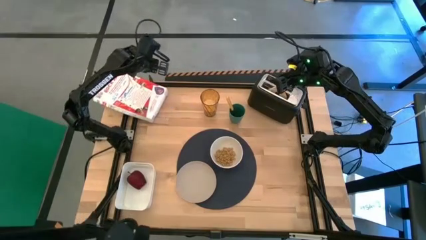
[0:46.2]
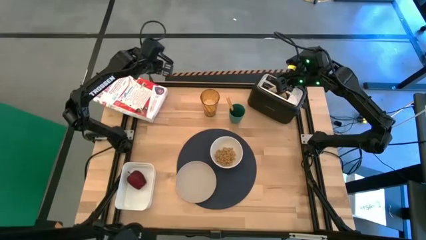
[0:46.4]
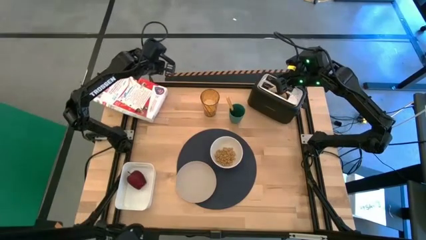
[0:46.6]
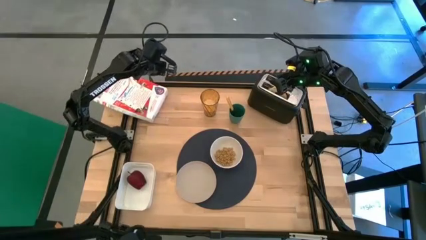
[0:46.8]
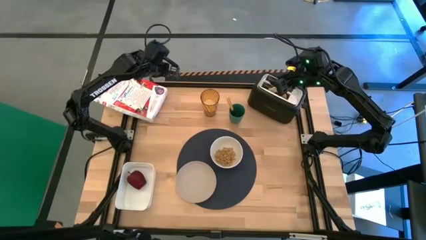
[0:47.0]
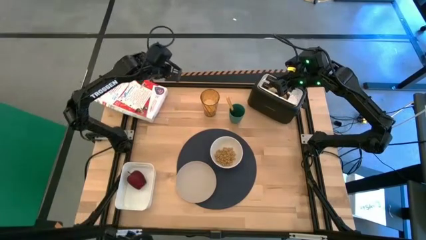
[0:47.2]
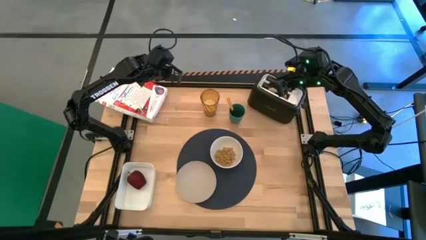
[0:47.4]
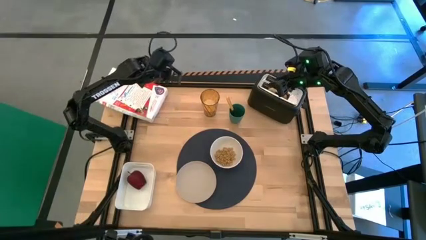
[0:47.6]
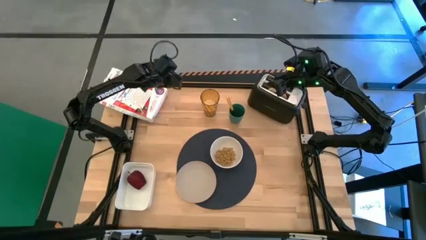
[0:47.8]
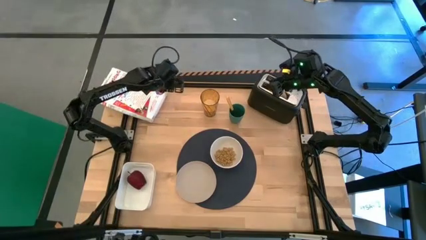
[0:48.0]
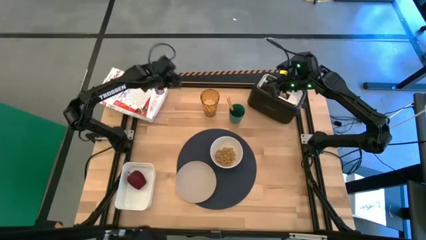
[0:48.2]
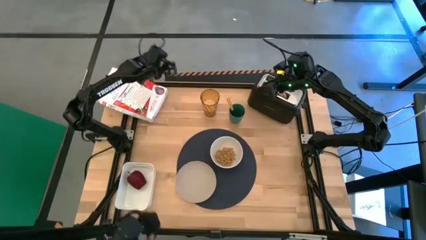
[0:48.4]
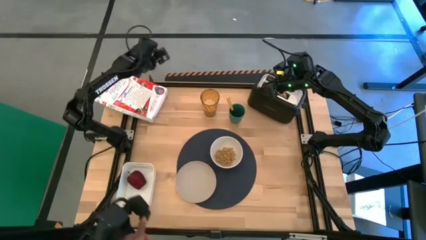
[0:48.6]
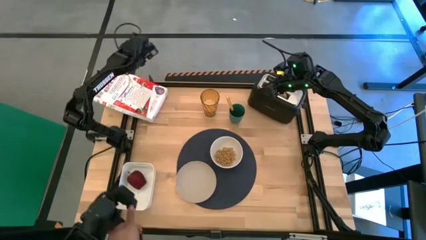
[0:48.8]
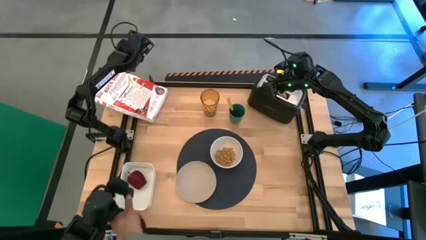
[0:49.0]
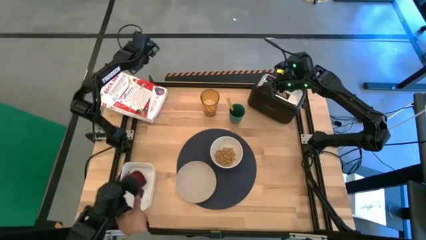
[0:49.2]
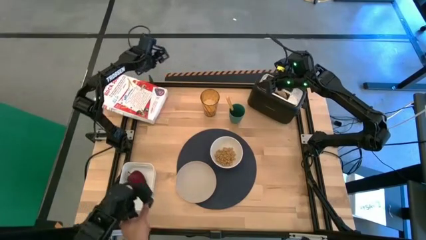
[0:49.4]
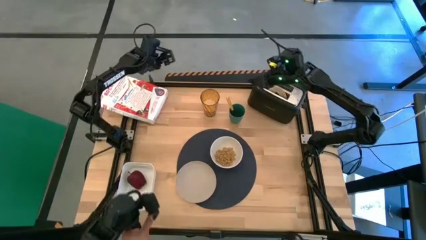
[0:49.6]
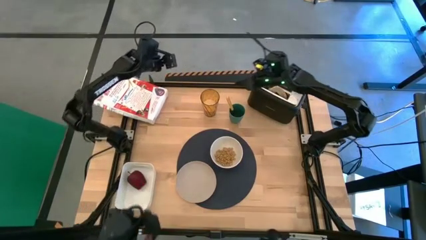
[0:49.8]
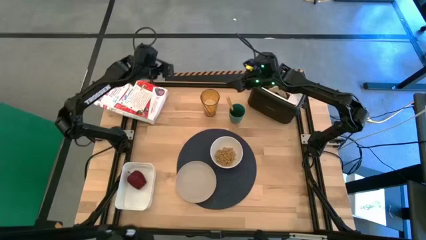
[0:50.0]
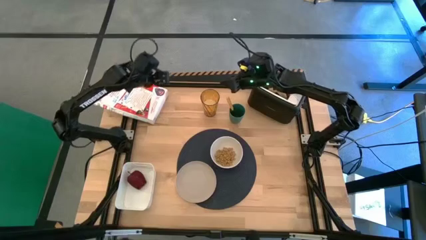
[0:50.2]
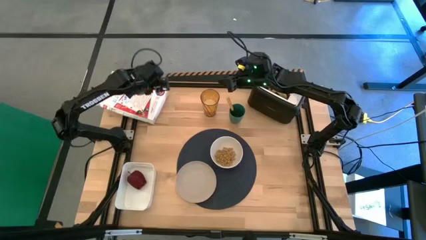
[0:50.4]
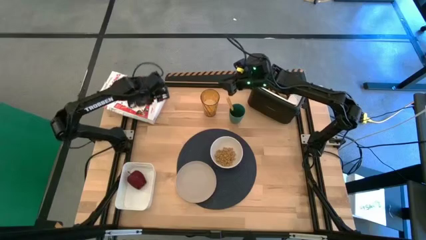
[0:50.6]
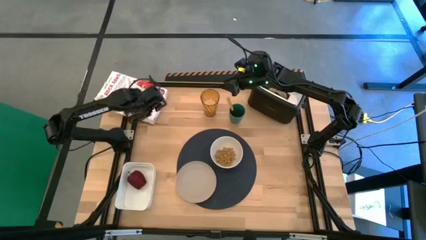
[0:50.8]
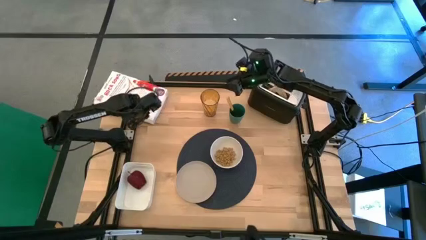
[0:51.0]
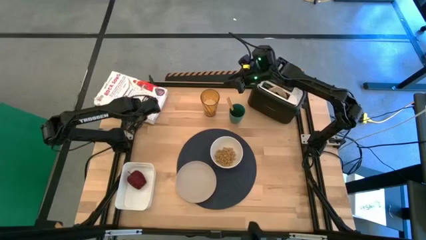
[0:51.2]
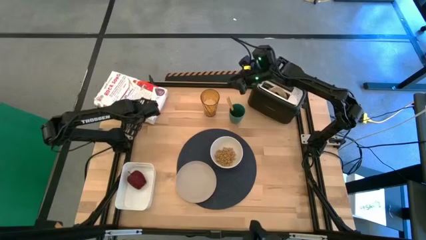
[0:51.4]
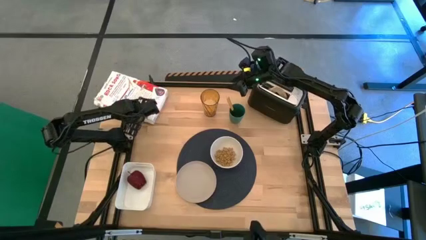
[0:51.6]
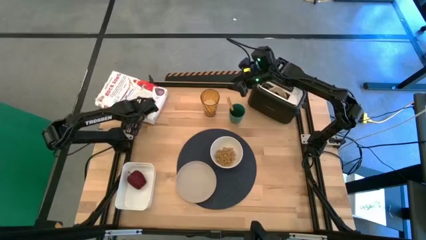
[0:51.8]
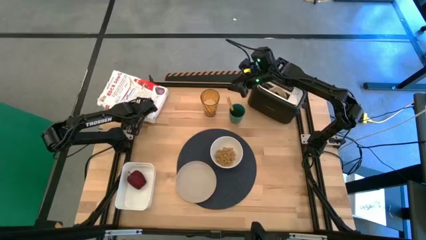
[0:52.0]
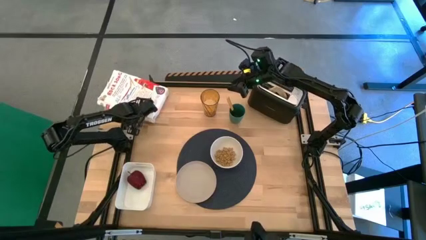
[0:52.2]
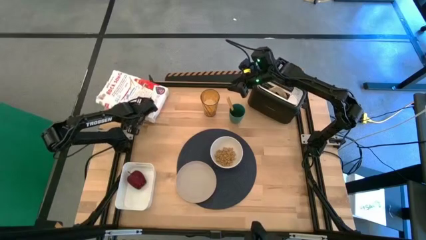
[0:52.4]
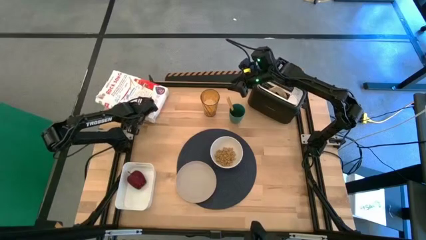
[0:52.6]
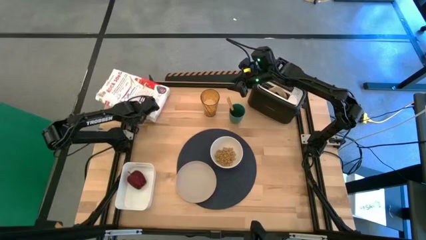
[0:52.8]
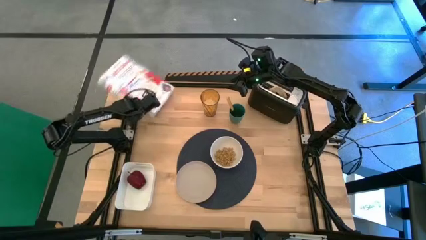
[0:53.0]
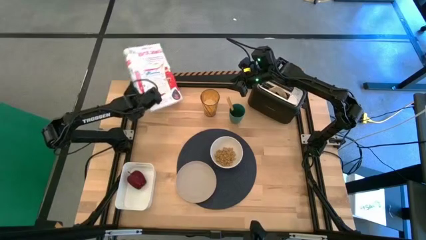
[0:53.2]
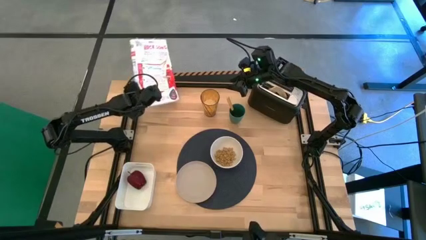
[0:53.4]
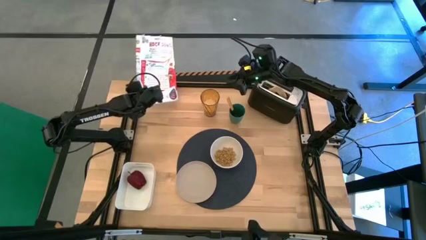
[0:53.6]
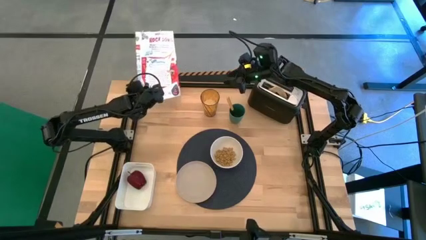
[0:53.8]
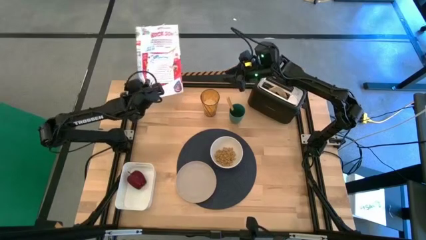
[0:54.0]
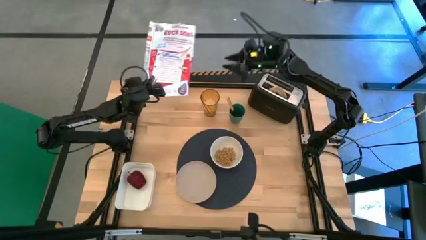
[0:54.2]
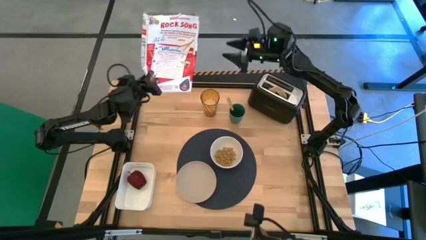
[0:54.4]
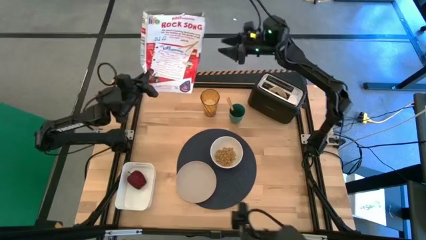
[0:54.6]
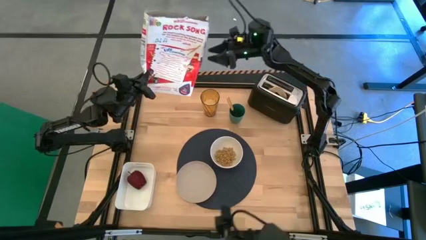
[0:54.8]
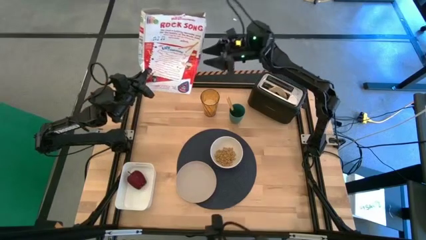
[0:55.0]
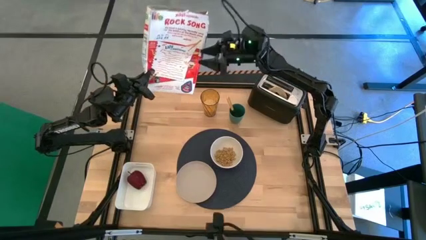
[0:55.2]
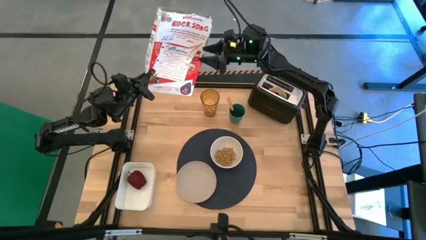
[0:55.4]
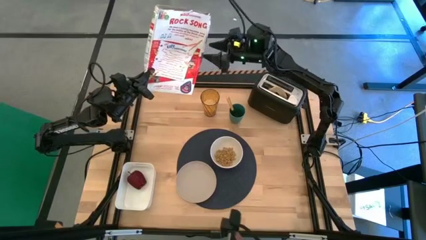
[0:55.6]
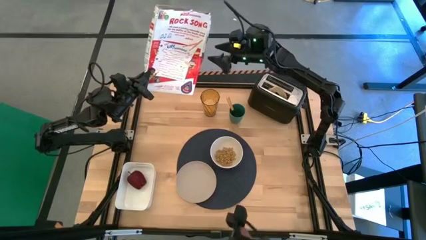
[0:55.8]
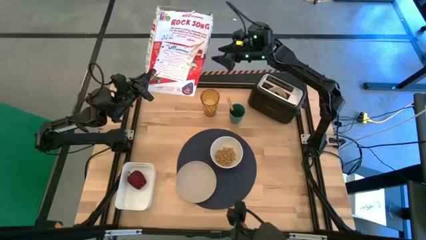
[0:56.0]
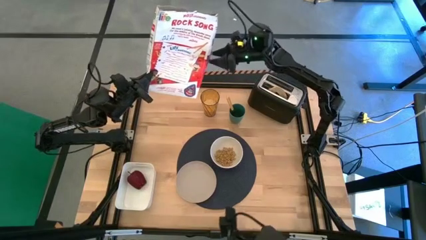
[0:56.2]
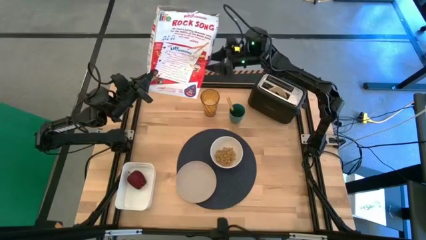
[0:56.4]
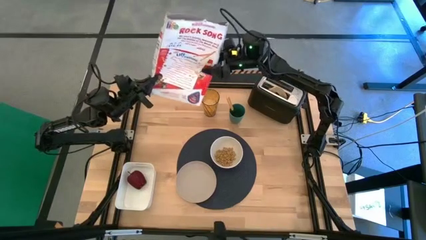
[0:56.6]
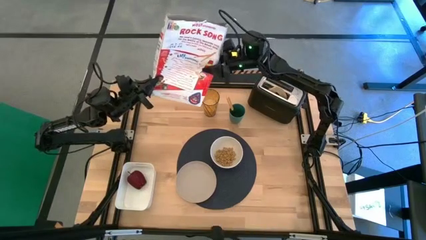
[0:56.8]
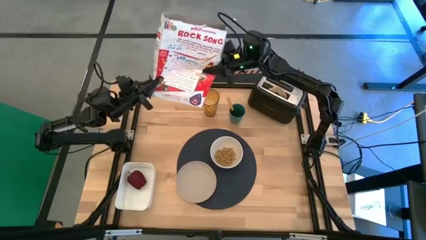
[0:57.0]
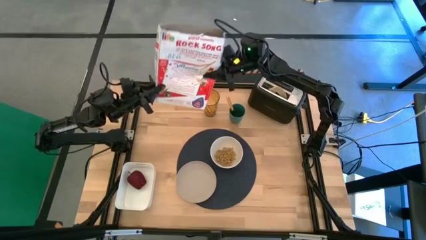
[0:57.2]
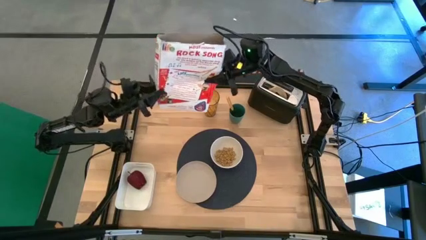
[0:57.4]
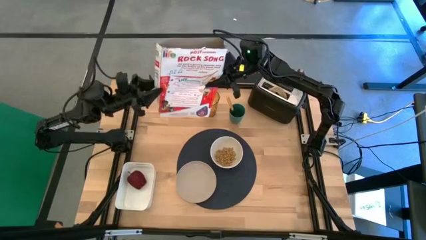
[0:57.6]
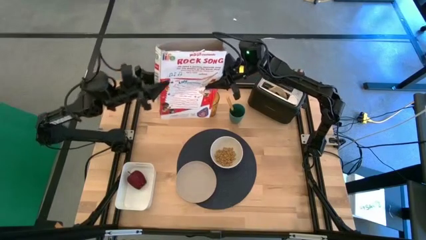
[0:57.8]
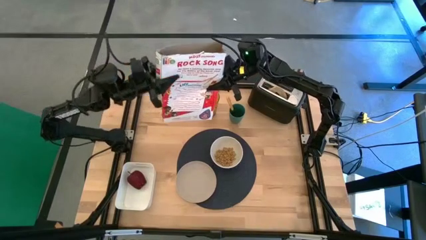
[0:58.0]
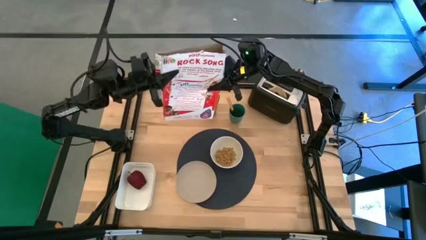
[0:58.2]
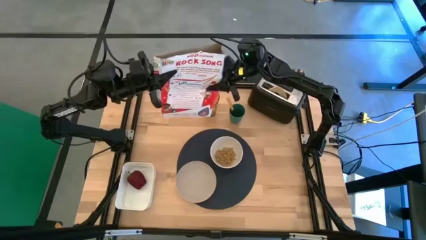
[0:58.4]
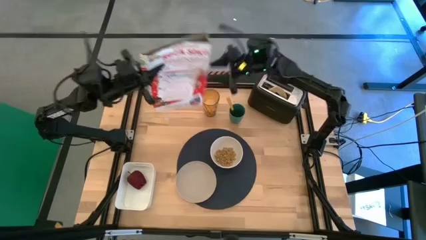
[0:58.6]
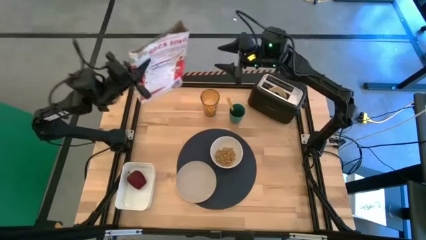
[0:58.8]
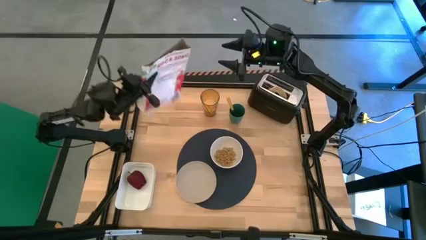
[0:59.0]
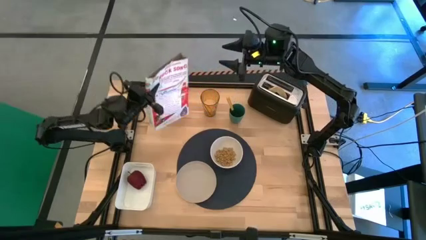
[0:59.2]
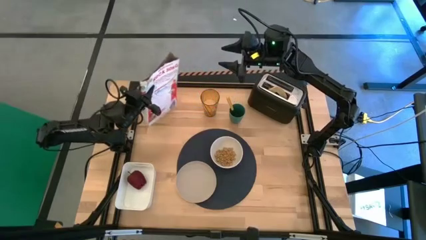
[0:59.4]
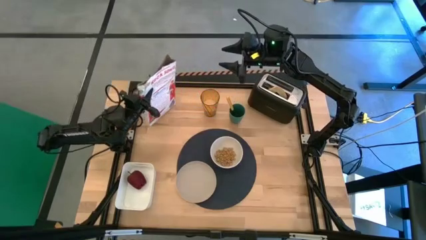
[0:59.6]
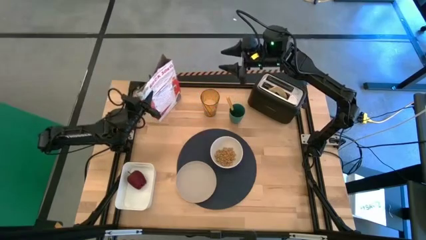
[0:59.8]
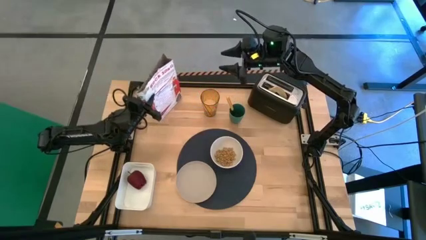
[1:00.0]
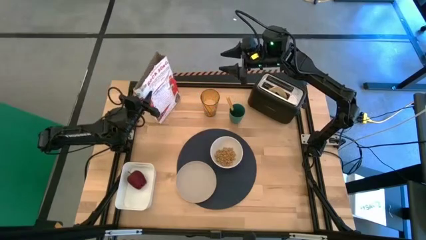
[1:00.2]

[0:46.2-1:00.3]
Task: Arrange a breakfast setting
Put the cereal box on the top left of the table upright
